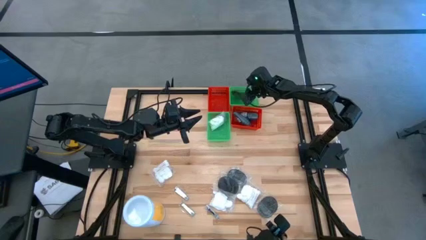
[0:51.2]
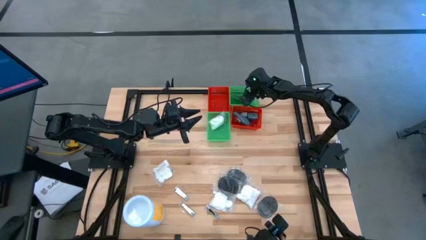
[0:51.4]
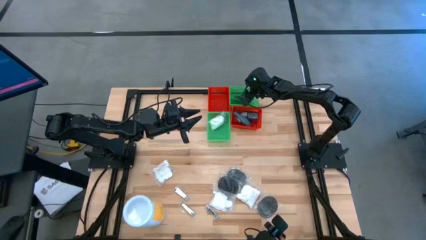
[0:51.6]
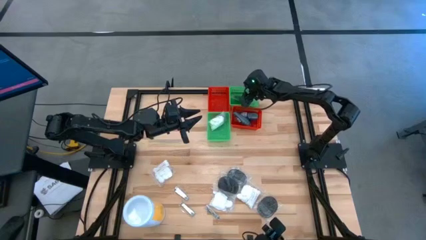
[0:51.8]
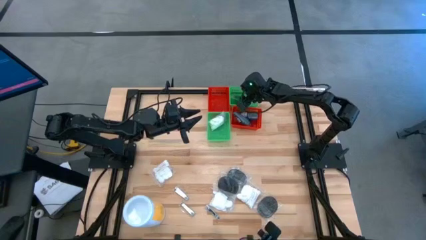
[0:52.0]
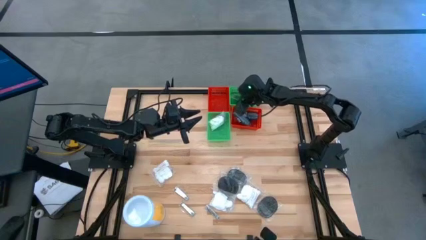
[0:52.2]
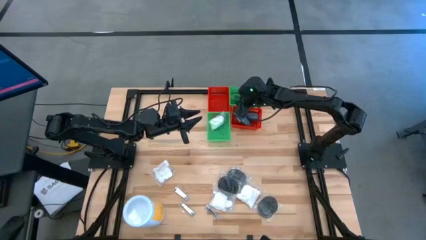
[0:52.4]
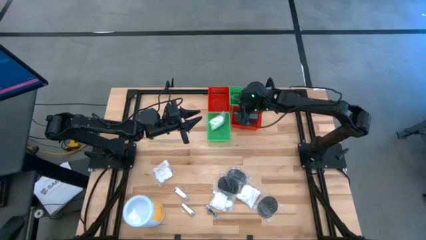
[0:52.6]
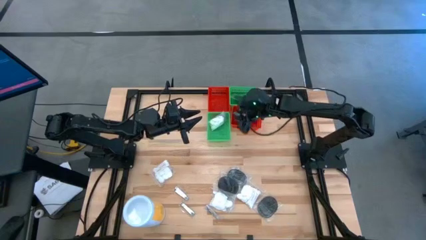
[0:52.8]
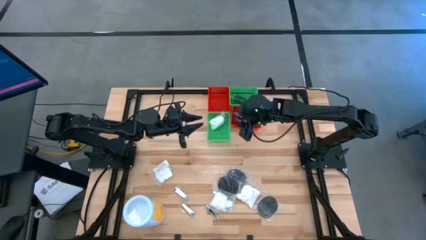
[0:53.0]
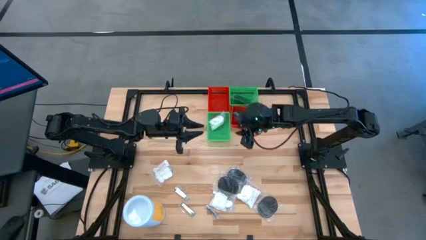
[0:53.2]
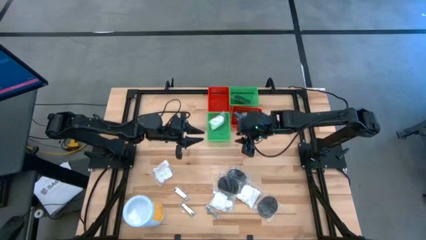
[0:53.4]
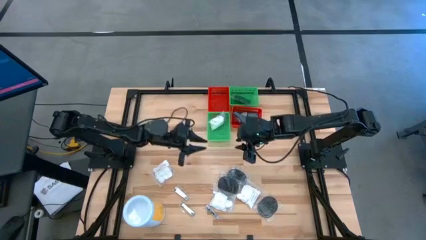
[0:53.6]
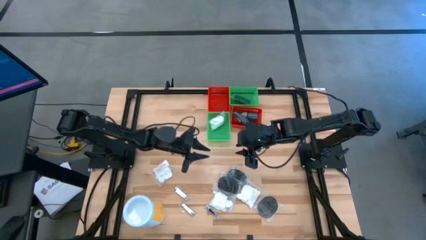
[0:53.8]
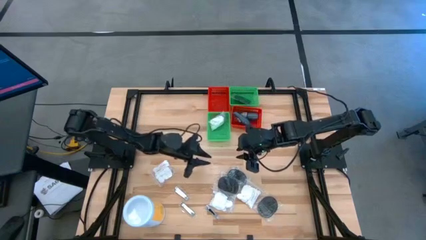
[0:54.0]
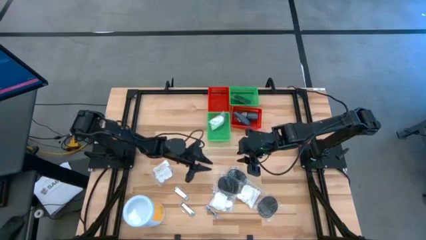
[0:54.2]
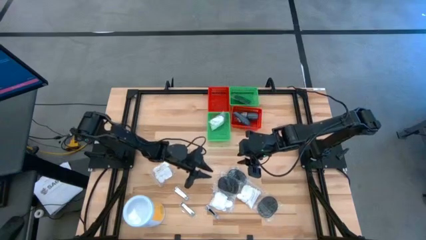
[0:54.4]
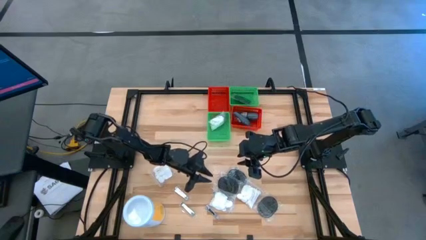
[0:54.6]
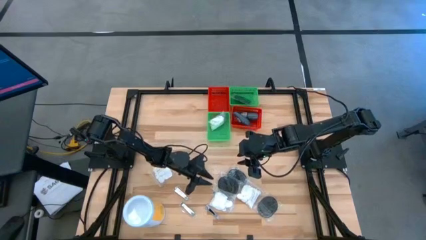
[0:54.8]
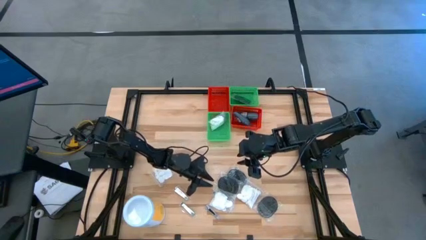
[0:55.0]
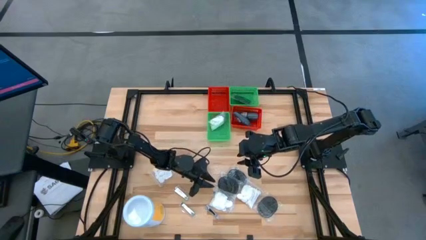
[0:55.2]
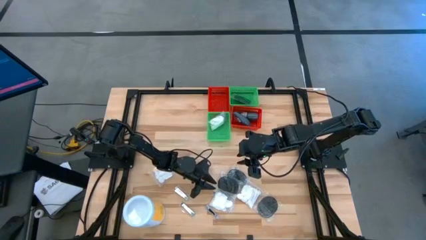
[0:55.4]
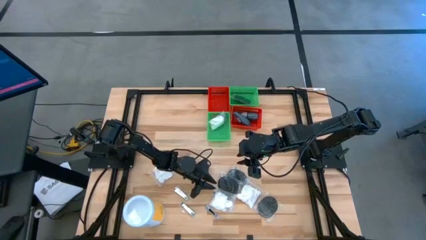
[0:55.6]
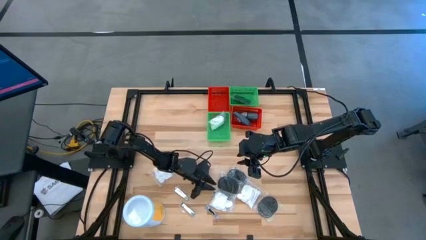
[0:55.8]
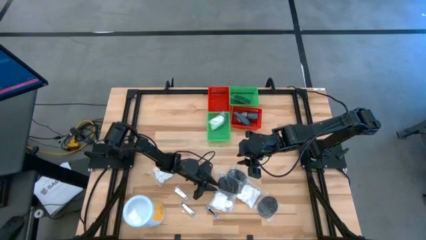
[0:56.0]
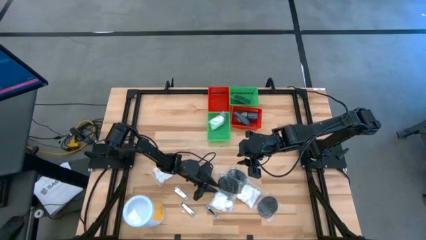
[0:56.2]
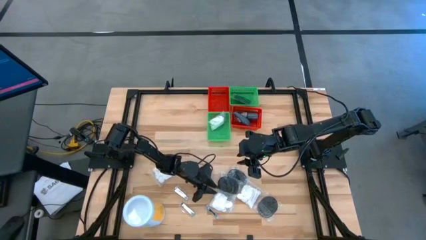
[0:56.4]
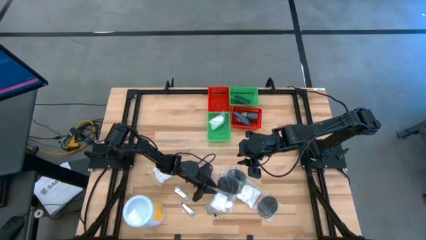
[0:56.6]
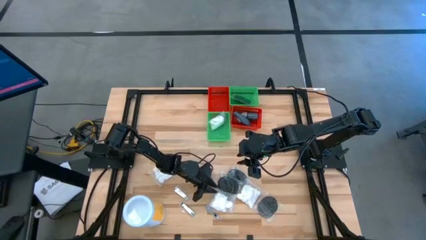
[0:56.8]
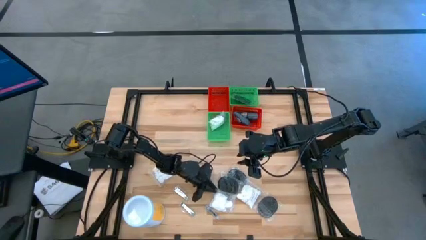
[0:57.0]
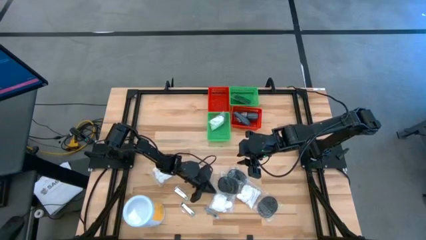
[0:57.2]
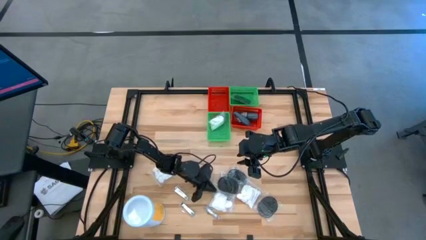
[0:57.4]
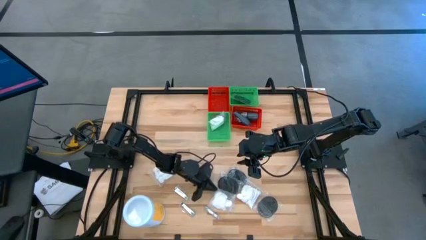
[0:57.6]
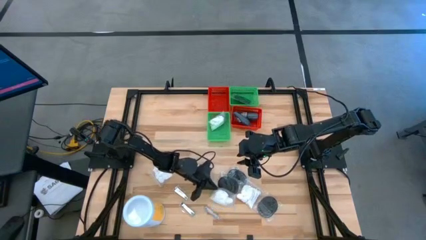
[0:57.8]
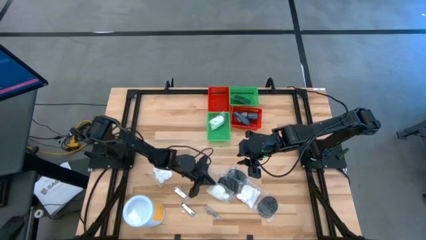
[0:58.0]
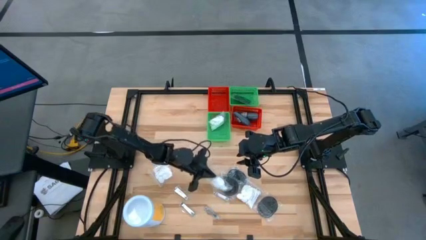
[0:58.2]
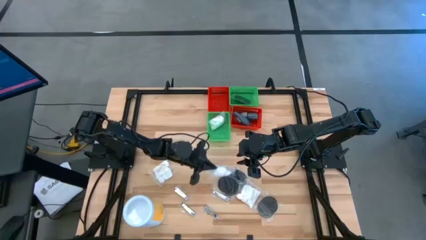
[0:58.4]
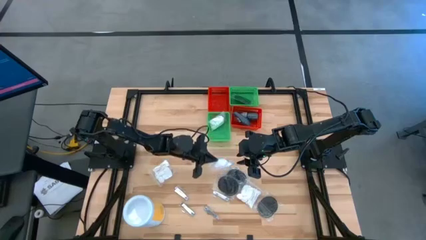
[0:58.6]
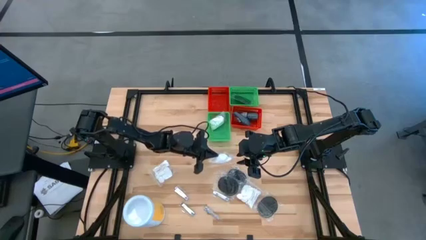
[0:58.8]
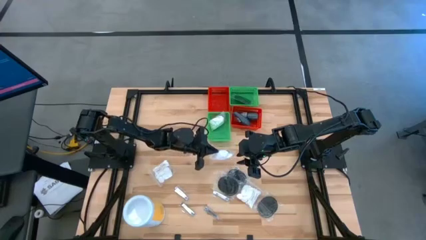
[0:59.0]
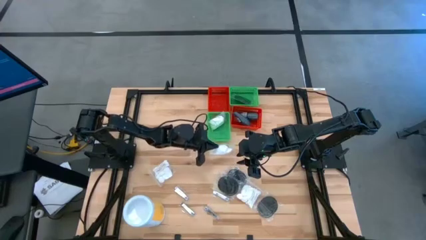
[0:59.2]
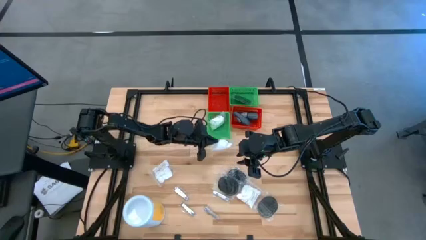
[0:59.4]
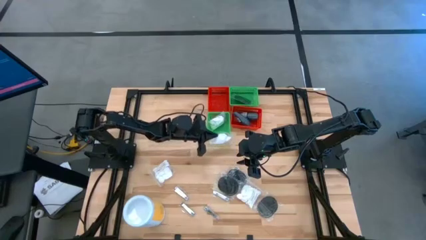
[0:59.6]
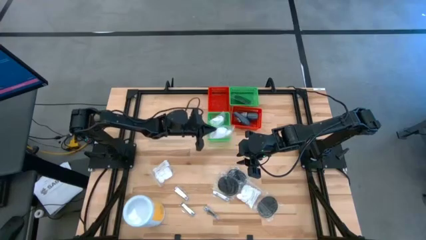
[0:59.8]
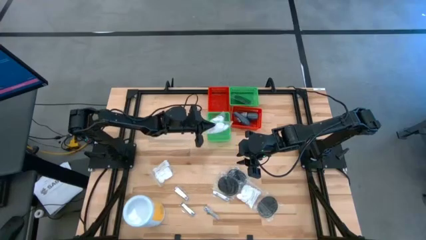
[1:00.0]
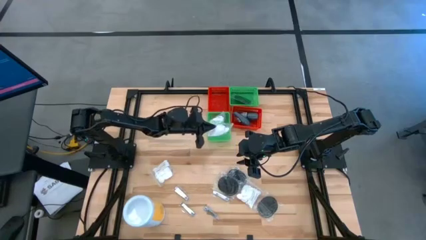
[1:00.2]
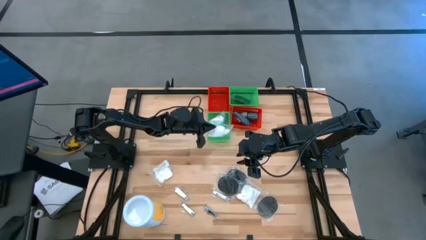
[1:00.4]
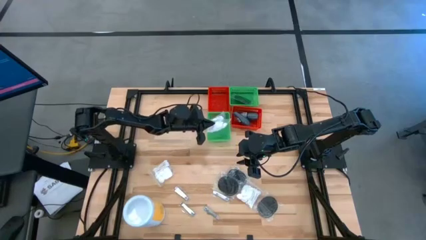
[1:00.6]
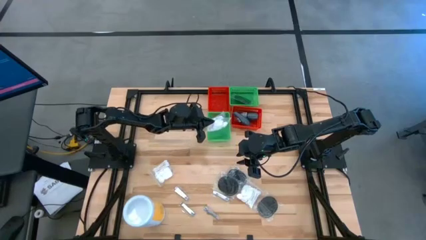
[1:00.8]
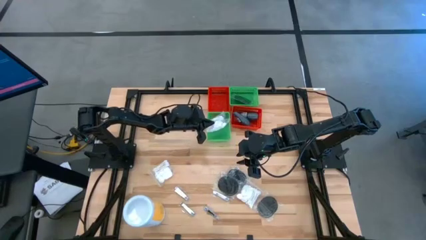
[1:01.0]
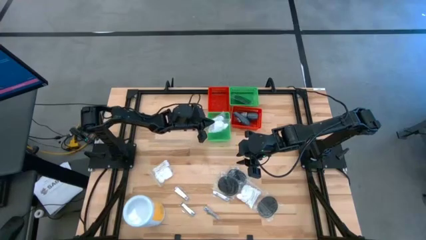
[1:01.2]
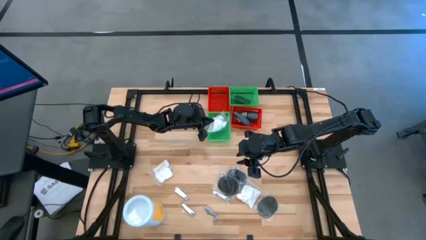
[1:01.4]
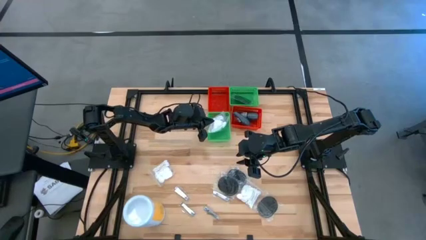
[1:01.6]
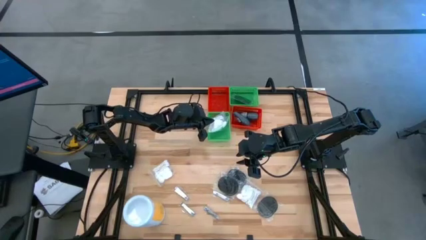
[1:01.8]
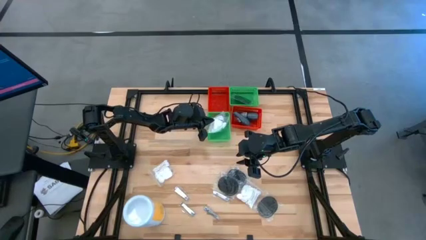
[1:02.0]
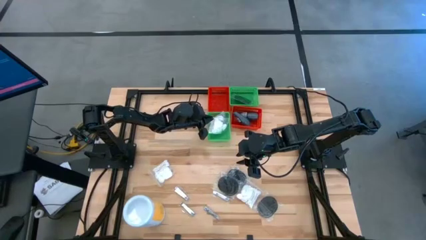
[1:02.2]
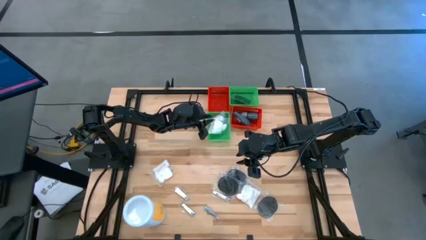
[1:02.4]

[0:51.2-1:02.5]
Task: Pick & Place Travel size toiletries
Put the white cotton pack into the left green bin
